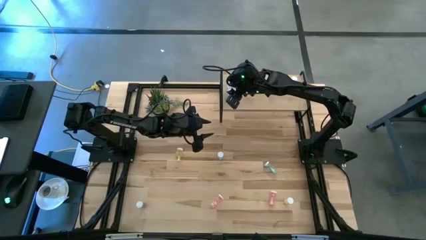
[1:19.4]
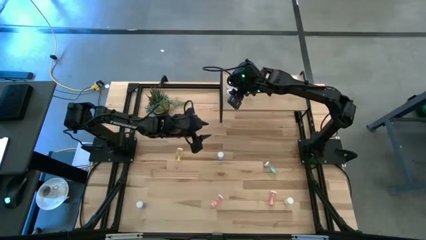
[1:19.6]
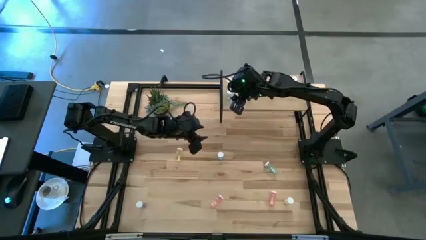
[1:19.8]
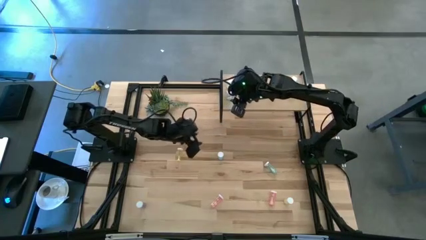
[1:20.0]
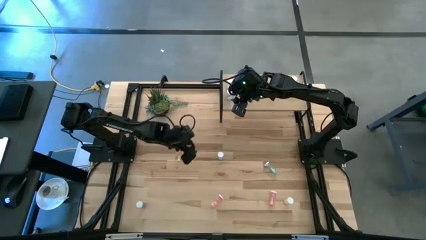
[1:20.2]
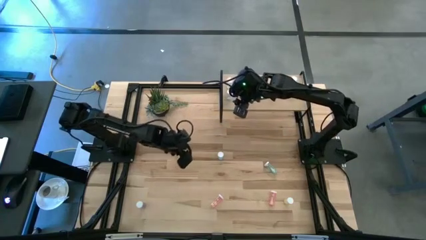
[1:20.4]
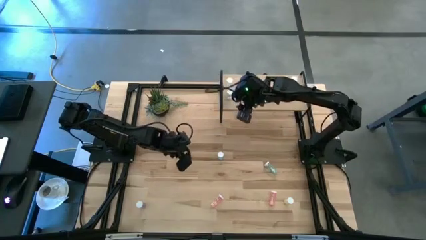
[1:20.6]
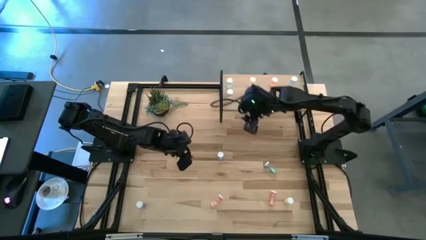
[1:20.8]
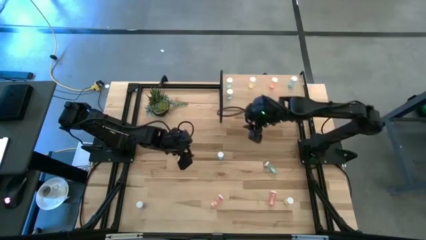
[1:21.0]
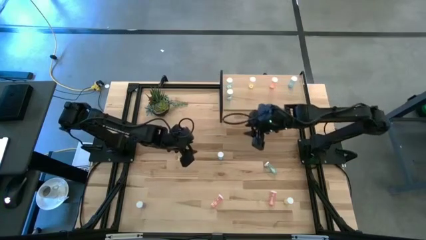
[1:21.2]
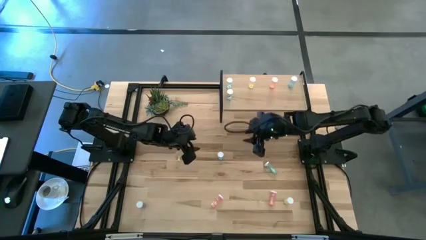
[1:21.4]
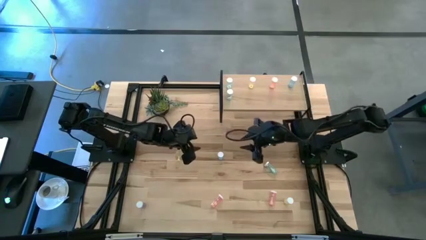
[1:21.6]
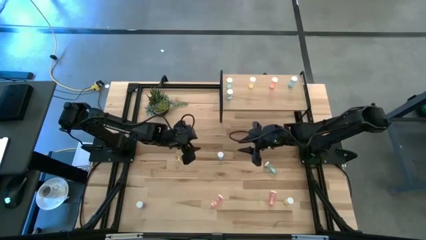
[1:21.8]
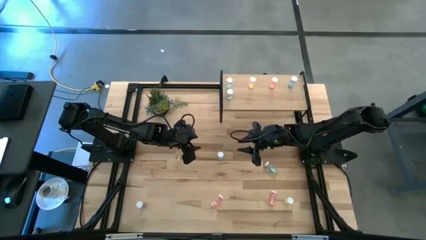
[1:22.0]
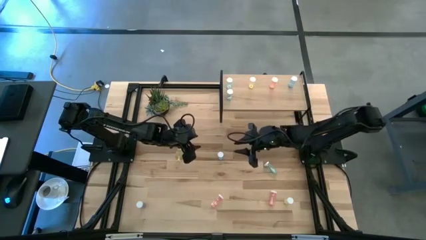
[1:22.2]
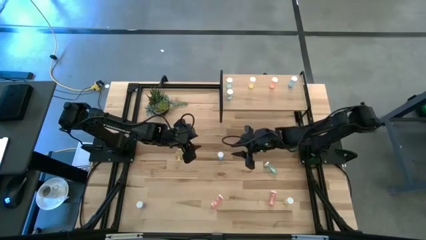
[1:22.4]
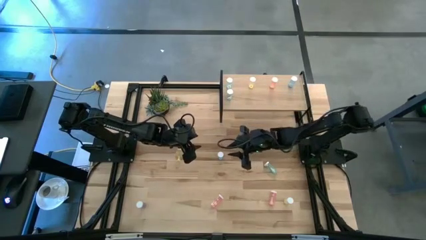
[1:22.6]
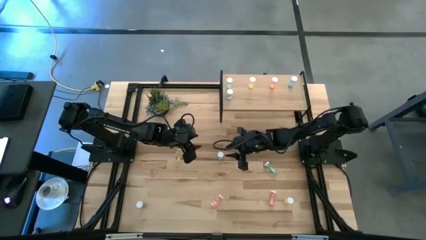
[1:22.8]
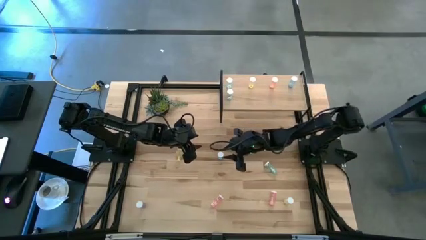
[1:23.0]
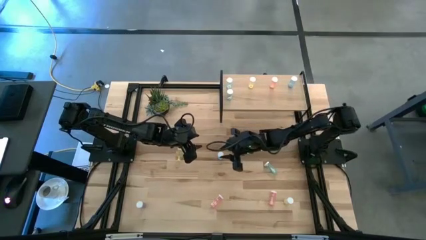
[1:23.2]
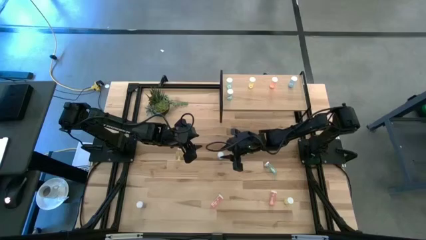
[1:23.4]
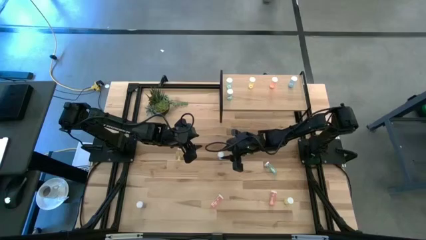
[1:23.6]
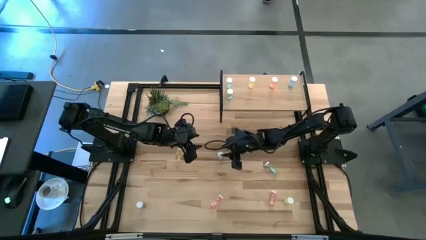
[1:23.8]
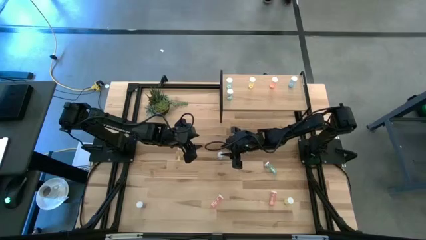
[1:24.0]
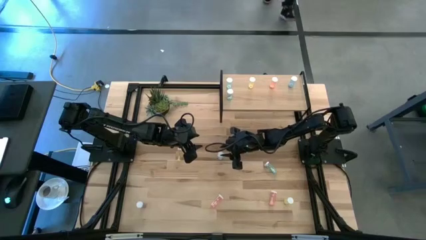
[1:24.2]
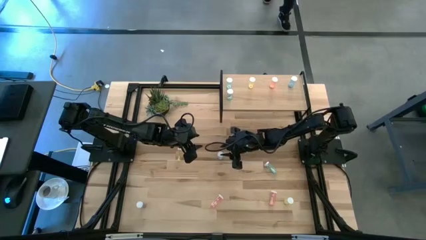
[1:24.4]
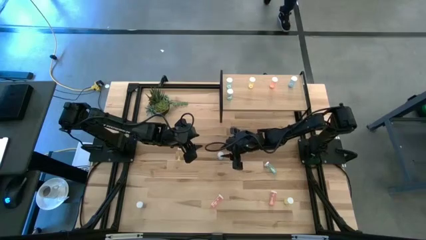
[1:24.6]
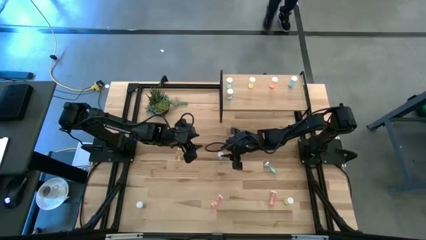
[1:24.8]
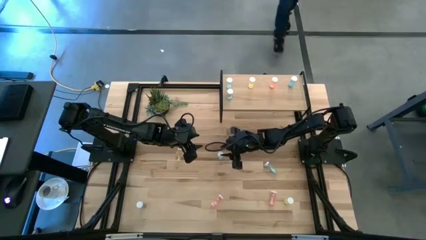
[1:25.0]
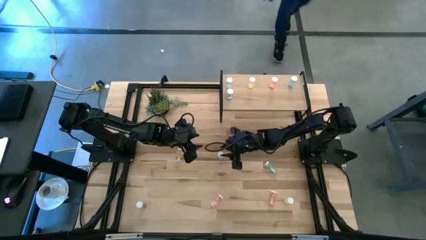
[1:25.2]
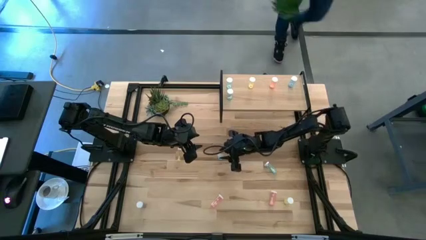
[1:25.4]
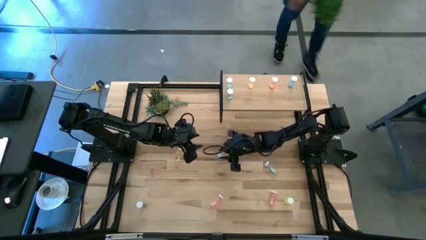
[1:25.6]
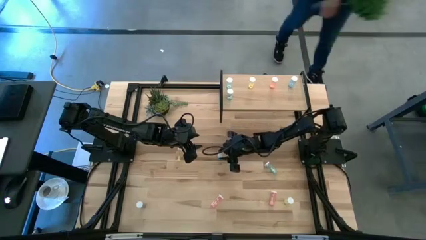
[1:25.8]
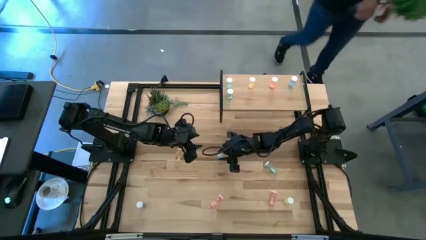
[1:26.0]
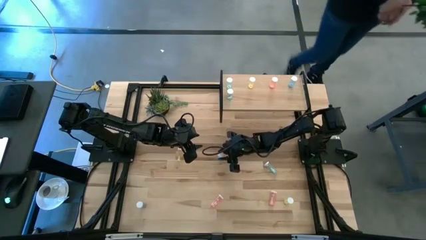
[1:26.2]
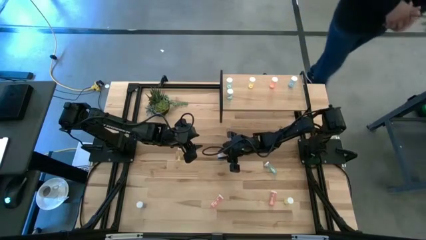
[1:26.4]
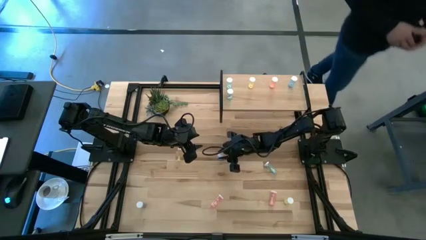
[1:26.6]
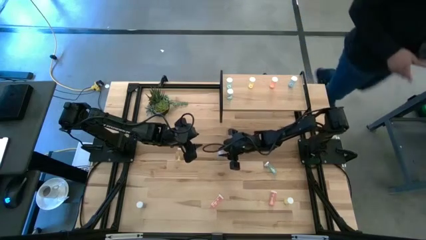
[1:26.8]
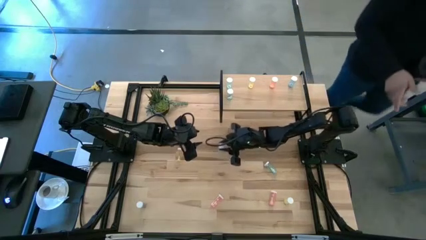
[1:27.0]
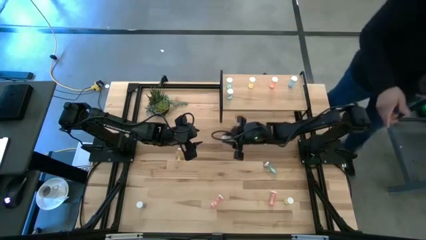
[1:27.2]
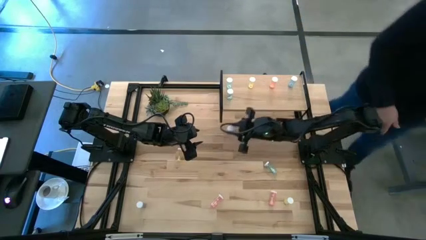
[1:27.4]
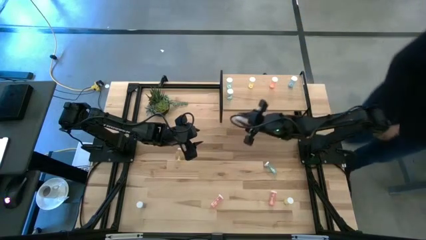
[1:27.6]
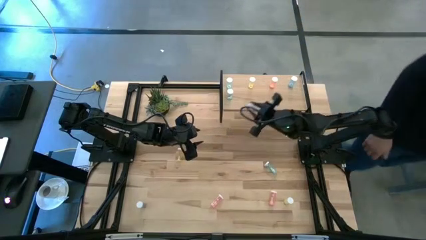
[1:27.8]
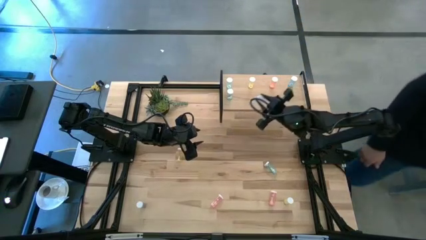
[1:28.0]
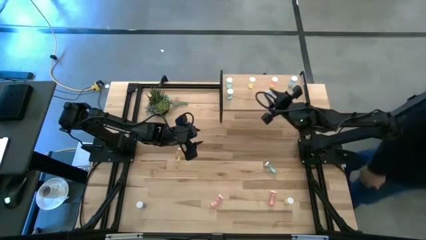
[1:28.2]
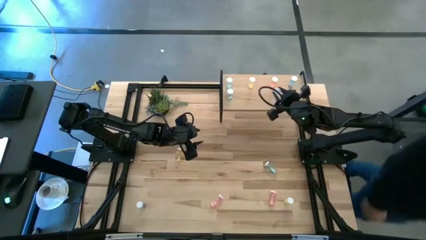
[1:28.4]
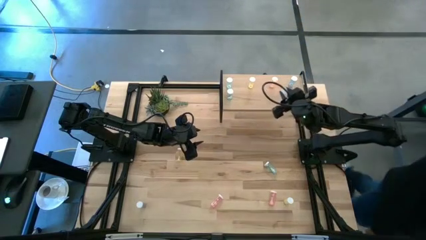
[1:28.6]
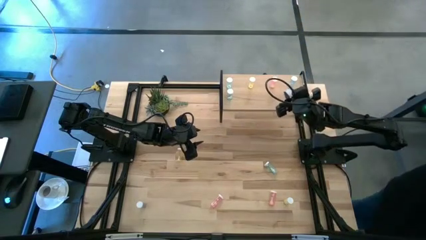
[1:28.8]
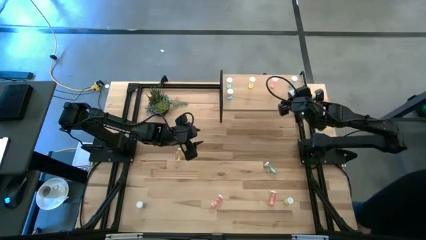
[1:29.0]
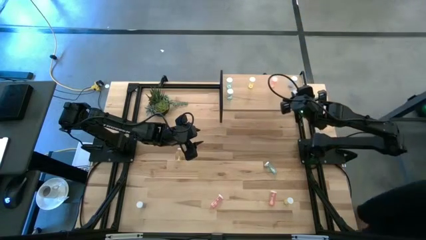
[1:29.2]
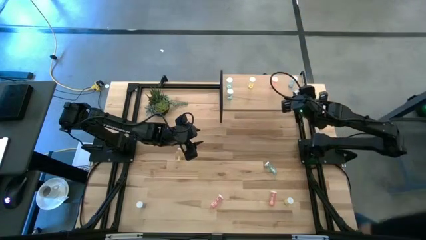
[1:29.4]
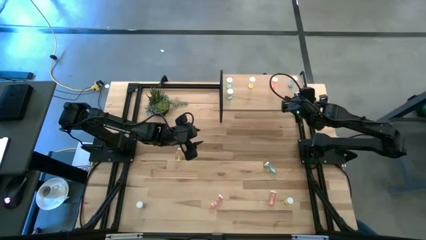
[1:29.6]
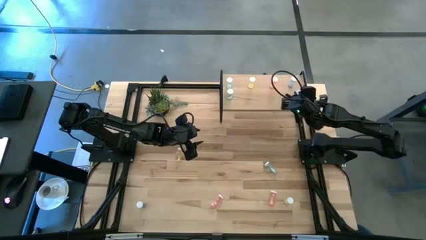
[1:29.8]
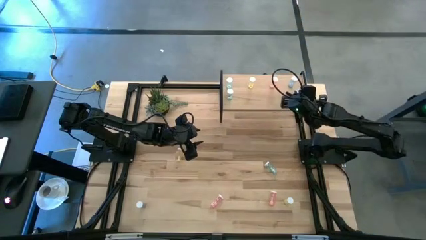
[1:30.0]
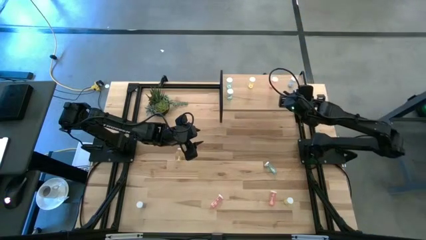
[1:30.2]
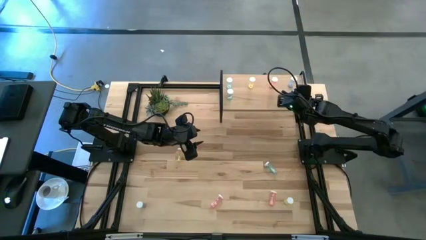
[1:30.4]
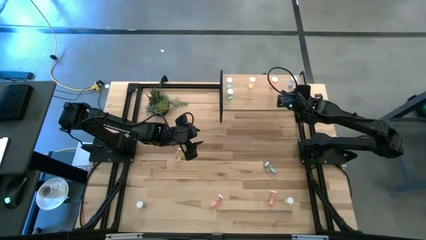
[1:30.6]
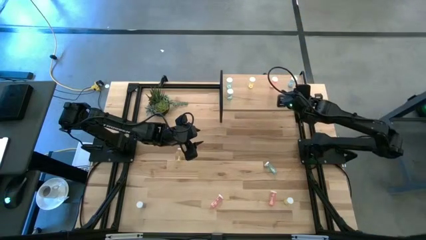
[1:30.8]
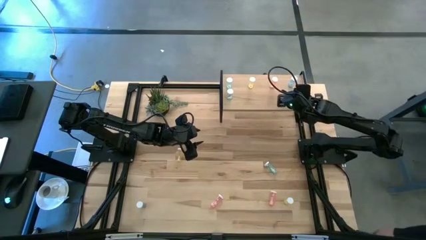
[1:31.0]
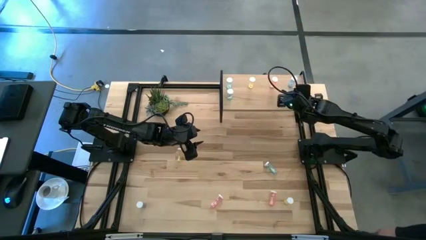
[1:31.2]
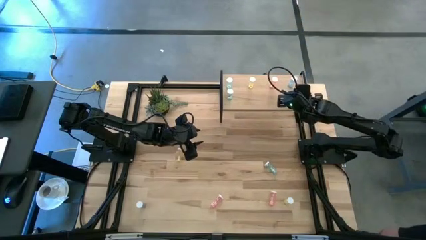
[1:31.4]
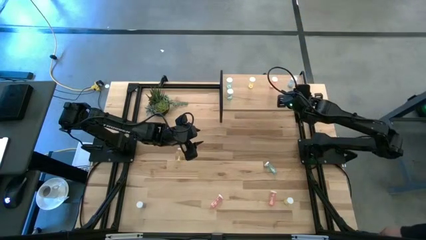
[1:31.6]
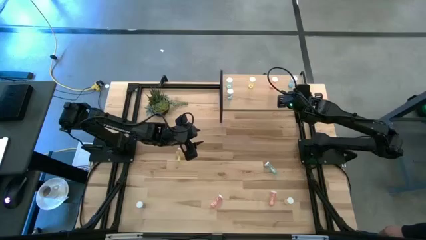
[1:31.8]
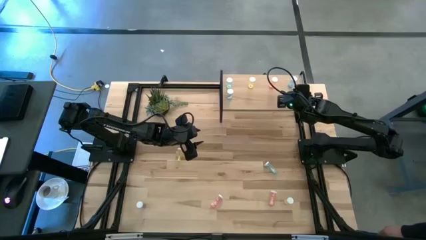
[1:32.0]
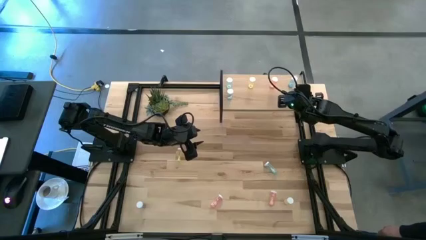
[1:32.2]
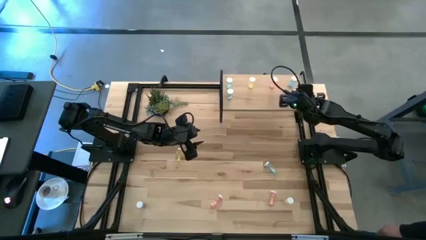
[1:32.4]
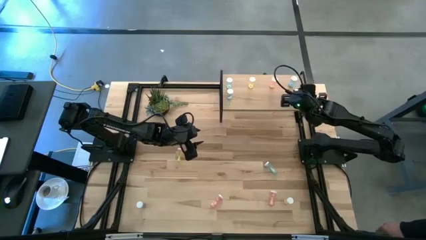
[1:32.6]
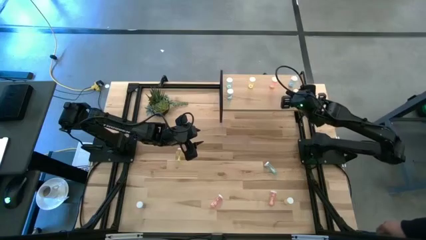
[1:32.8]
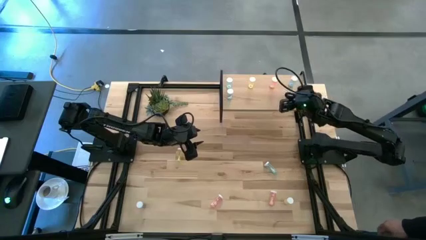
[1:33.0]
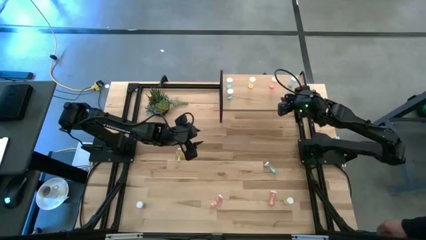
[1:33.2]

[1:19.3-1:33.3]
Task: Pick and place medicine bottles onto shelf by color
Put the blue pill bottle aligned with the other blue pill bottle on the shelf
